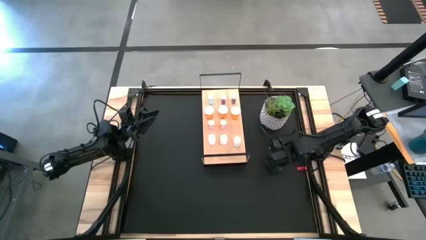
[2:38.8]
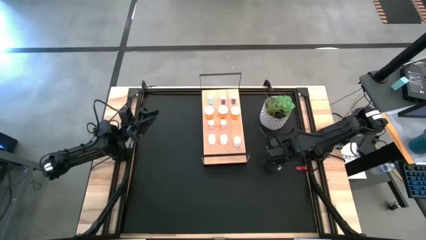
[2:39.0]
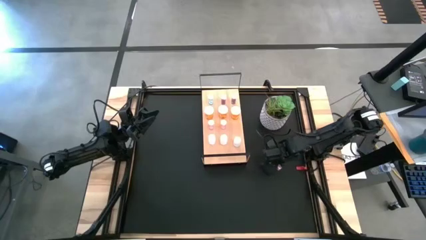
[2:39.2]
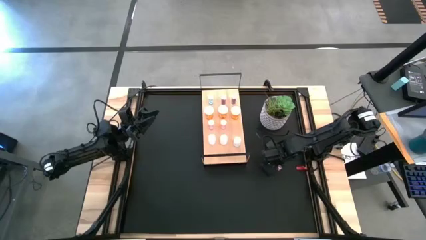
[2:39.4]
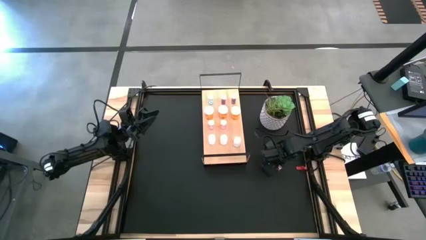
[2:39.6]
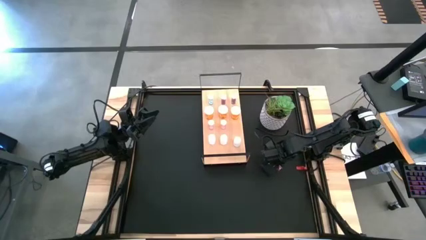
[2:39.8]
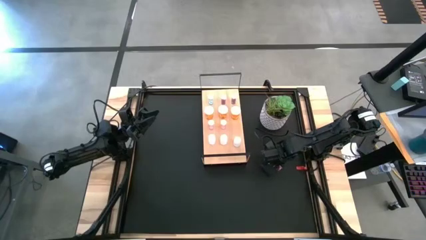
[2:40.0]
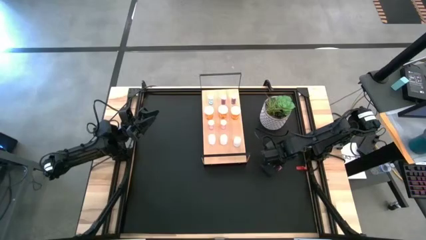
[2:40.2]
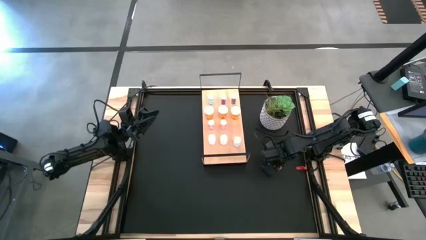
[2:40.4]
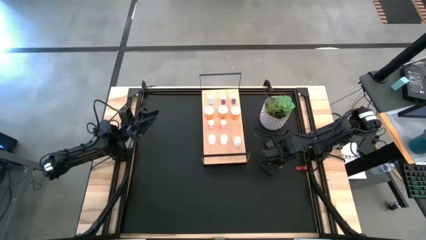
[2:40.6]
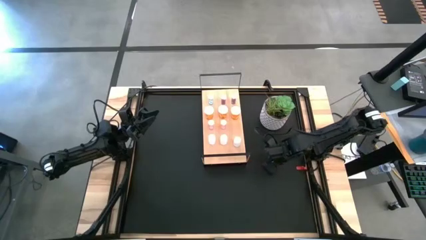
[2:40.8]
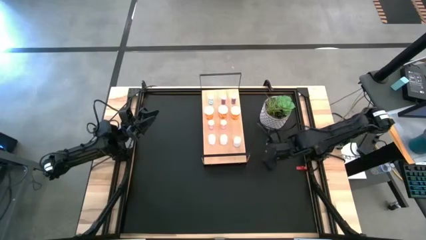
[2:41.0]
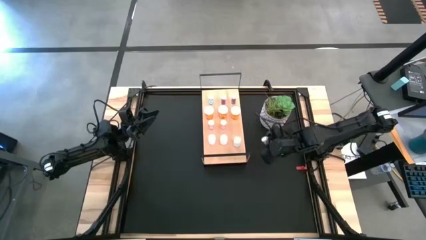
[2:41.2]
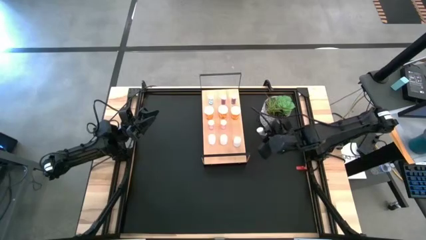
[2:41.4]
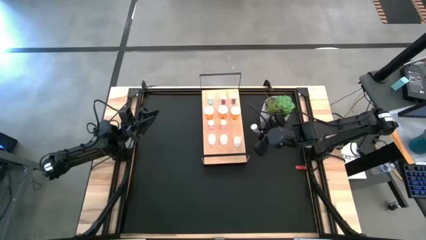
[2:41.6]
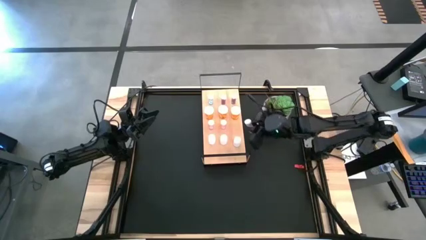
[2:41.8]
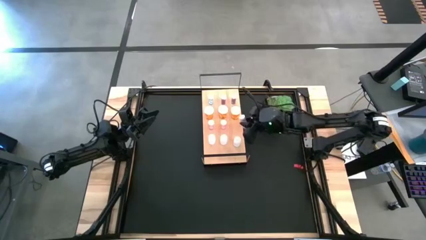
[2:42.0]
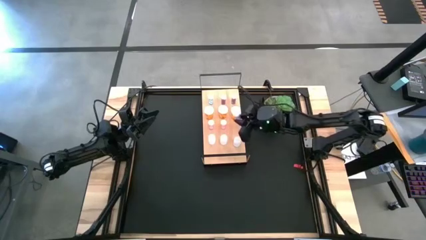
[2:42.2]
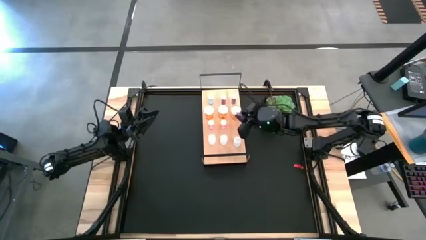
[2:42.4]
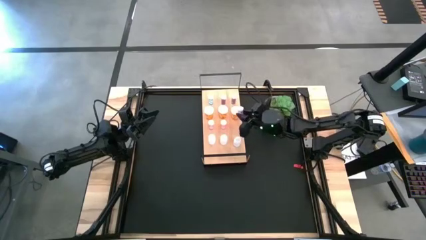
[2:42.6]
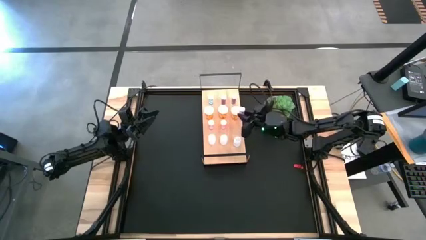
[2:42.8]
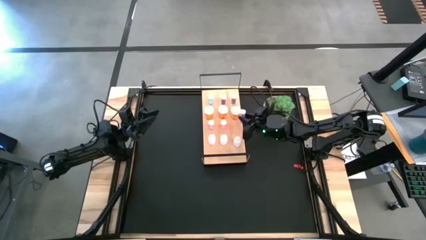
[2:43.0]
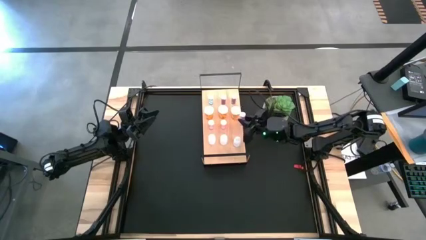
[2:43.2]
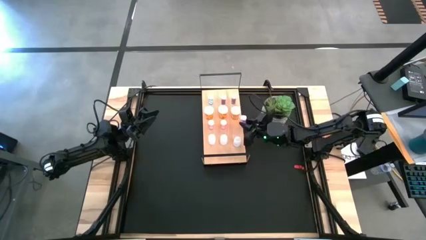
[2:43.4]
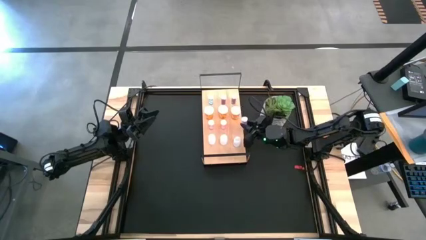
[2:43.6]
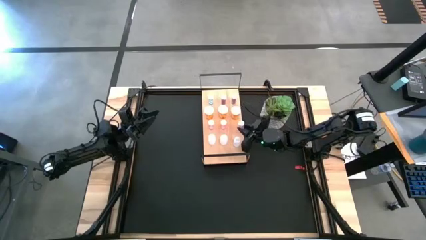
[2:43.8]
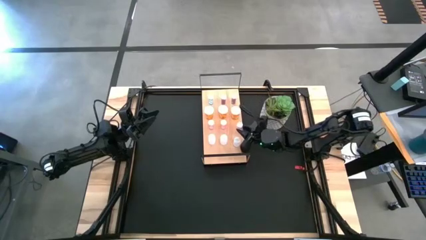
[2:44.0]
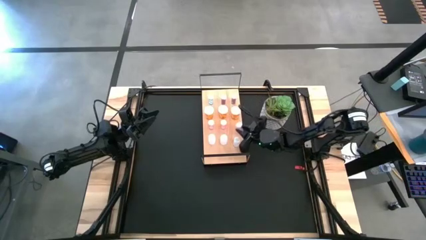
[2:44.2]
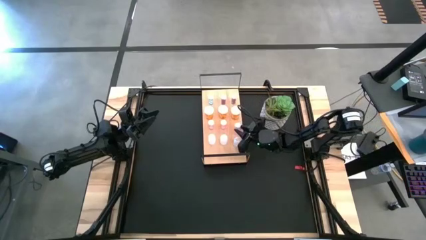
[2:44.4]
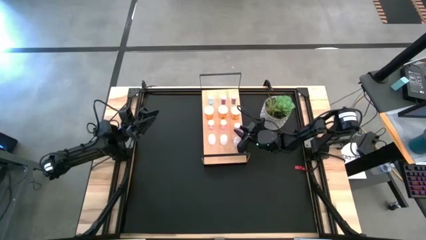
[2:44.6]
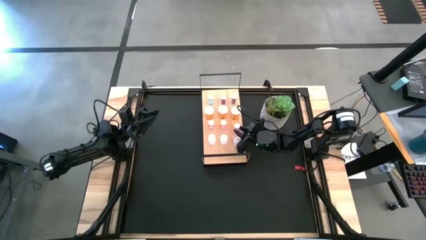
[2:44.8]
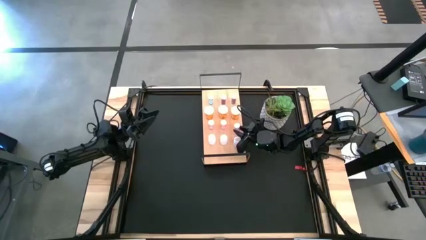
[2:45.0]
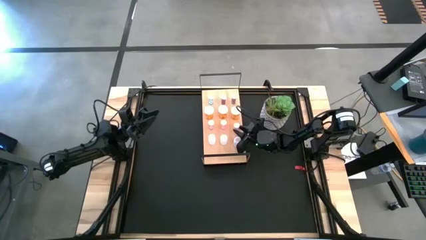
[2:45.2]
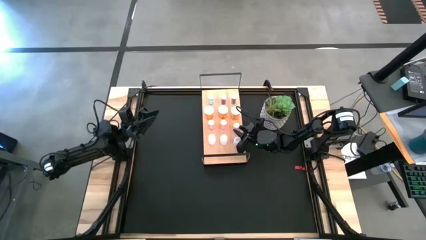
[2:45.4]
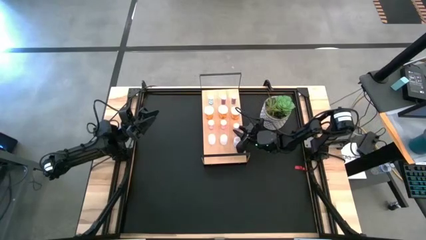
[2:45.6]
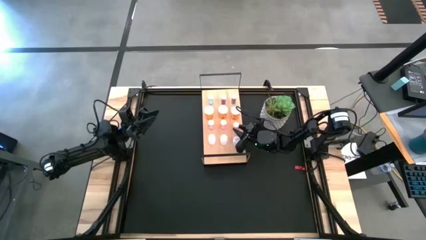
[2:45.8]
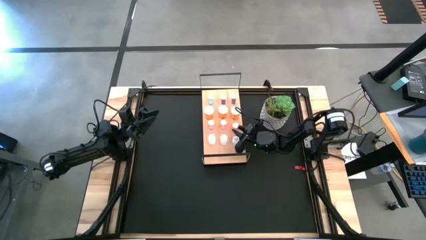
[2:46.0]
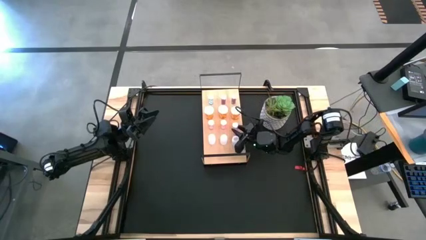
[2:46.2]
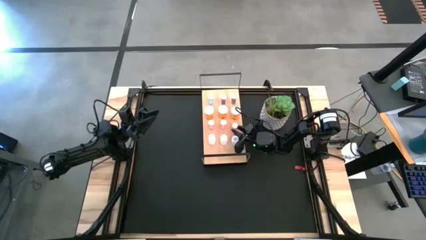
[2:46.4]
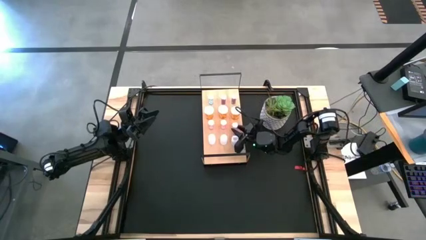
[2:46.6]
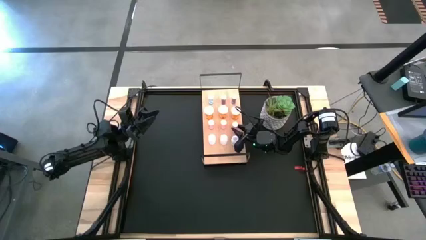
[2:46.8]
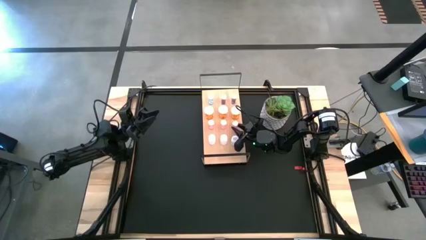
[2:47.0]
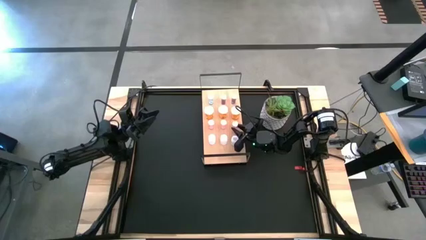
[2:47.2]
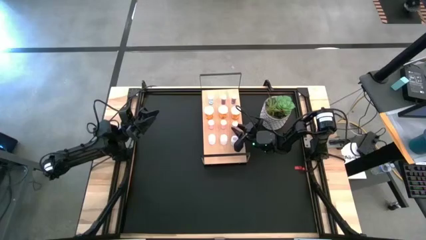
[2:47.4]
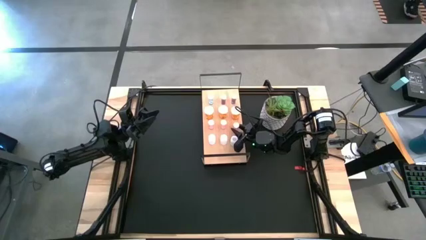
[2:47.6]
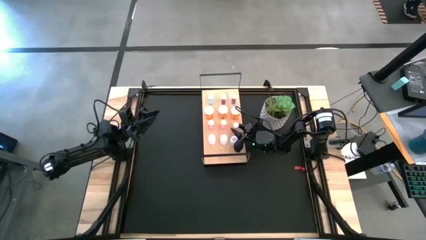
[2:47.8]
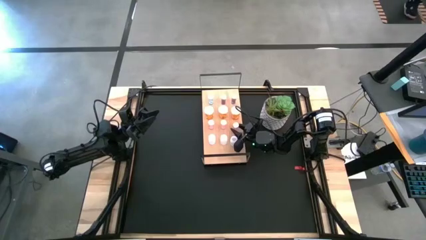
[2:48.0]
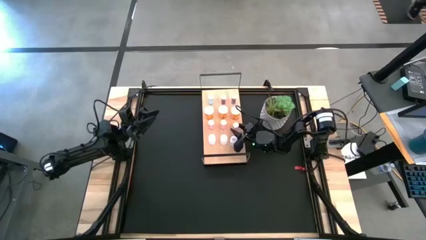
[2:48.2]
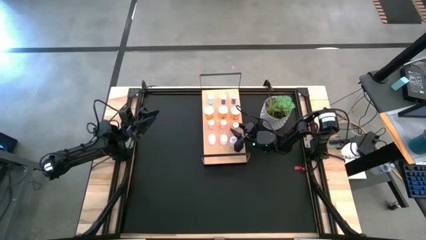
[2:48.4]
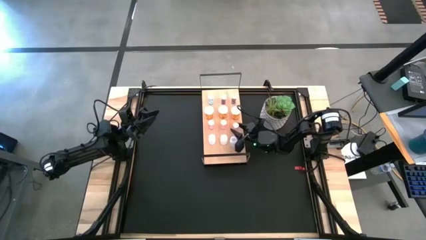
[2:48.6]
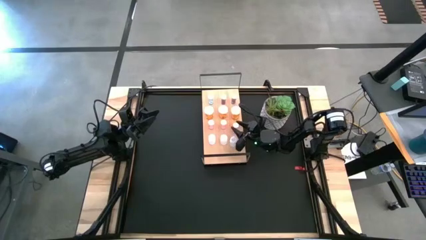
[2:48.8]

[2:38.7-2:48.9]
Task: Pick and place medicine bottles onto shelf by color
Put the pink pill bottle on the shelf aligned with the pink pill bottle

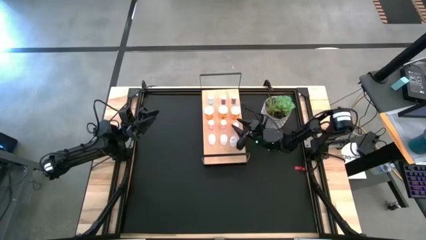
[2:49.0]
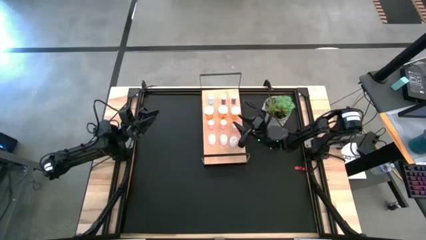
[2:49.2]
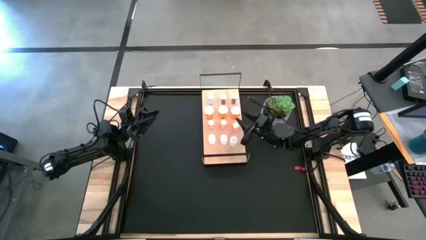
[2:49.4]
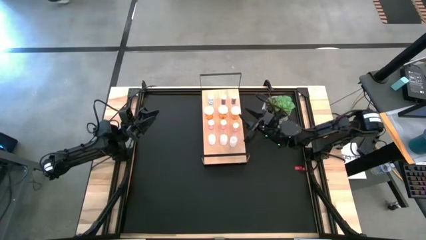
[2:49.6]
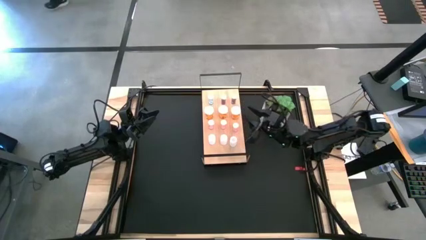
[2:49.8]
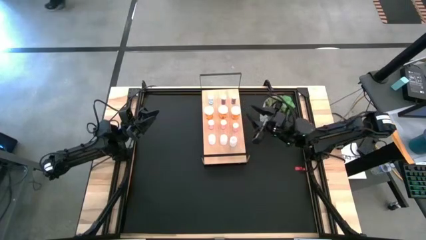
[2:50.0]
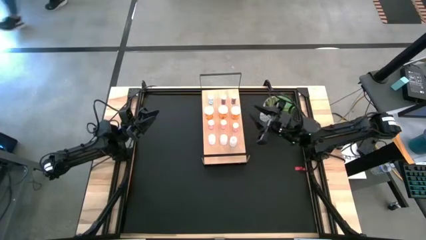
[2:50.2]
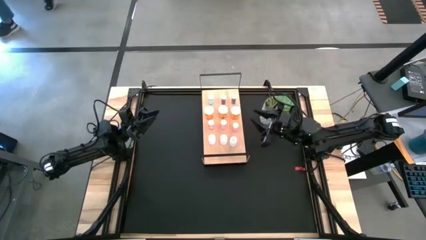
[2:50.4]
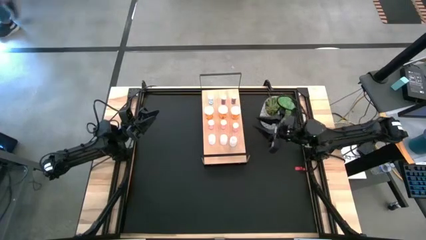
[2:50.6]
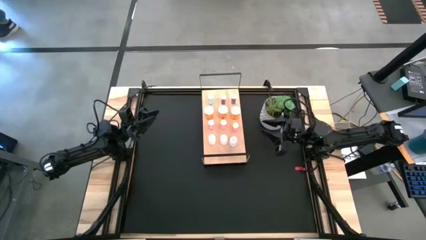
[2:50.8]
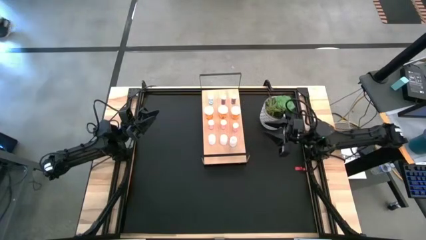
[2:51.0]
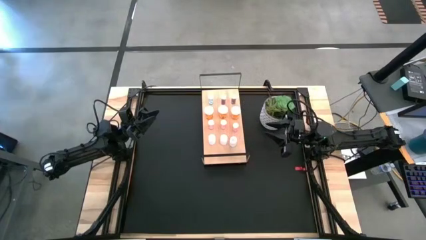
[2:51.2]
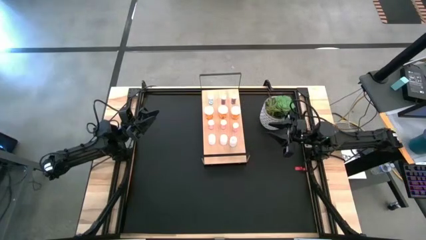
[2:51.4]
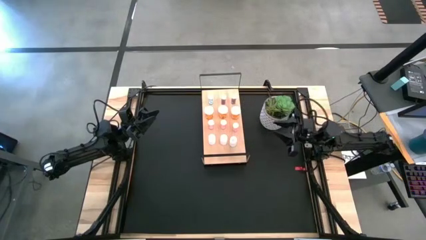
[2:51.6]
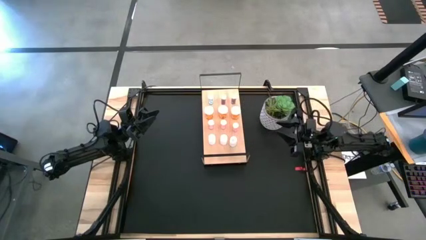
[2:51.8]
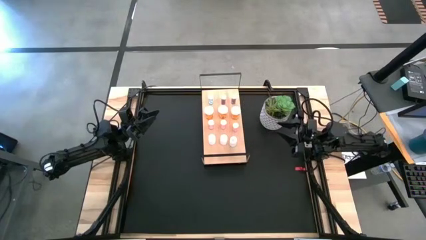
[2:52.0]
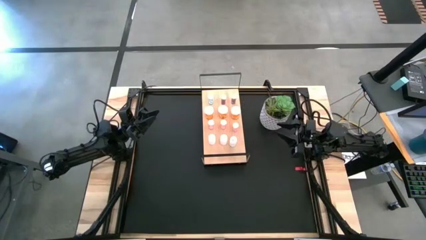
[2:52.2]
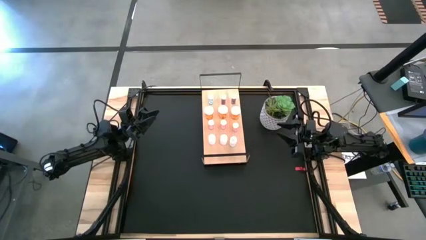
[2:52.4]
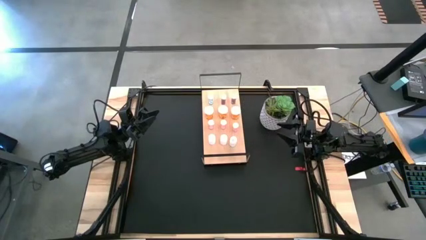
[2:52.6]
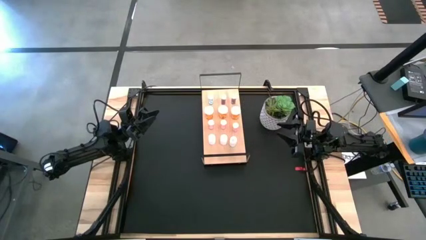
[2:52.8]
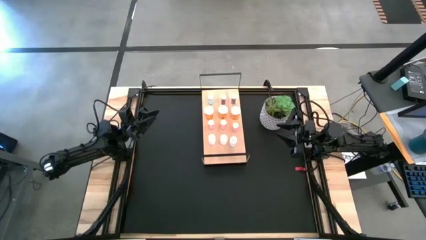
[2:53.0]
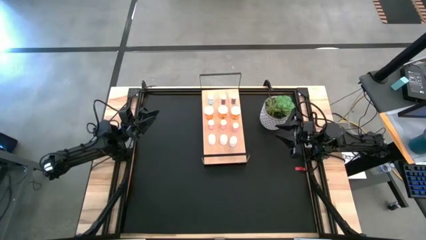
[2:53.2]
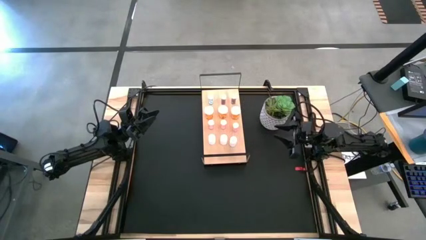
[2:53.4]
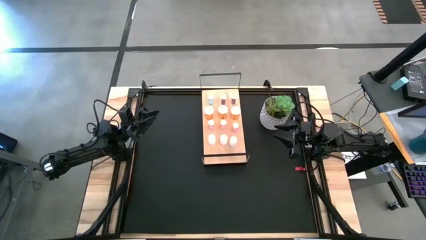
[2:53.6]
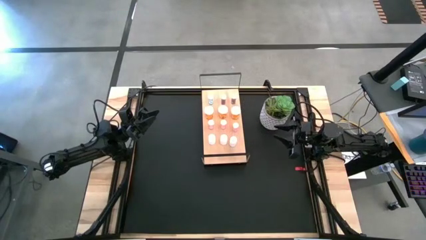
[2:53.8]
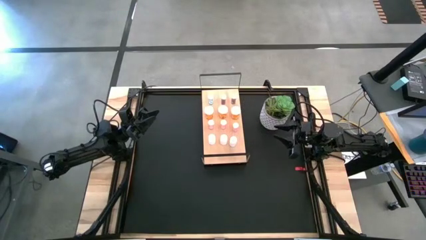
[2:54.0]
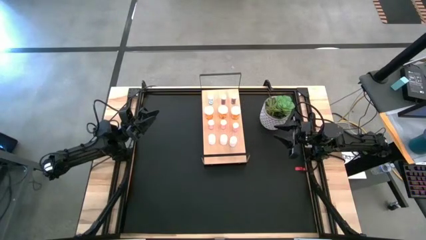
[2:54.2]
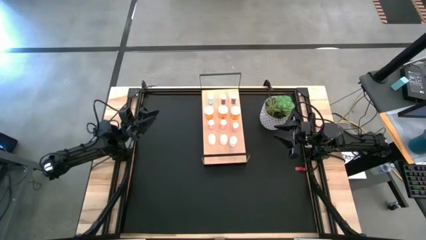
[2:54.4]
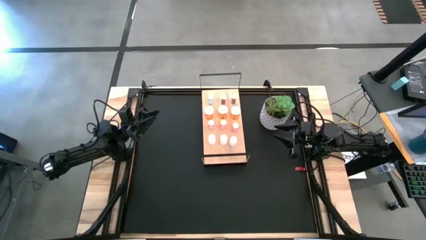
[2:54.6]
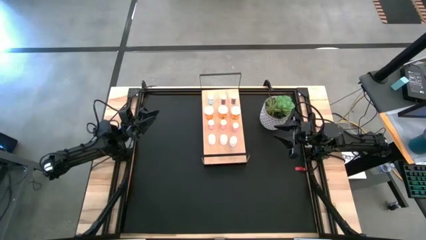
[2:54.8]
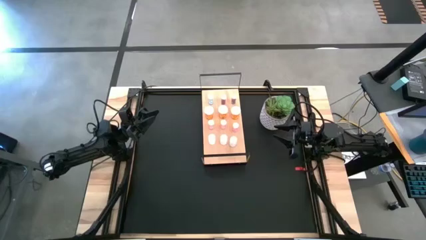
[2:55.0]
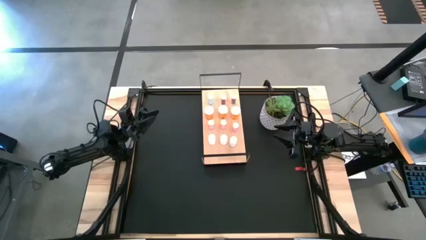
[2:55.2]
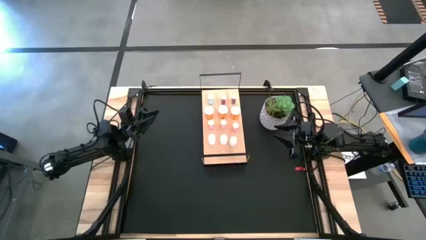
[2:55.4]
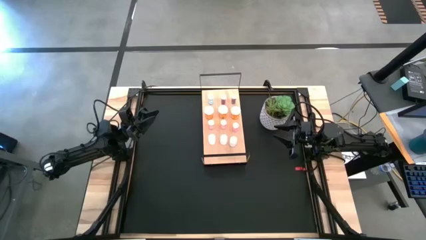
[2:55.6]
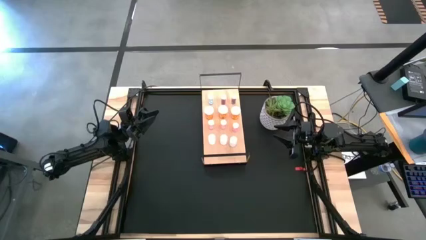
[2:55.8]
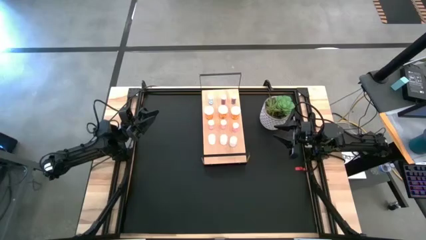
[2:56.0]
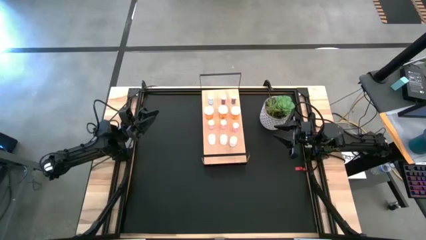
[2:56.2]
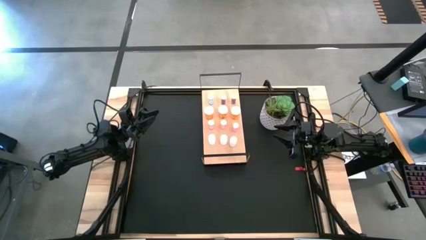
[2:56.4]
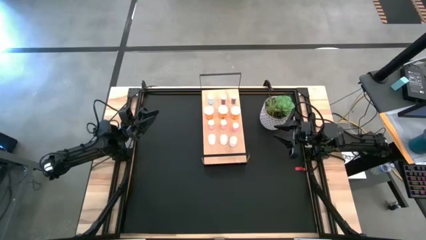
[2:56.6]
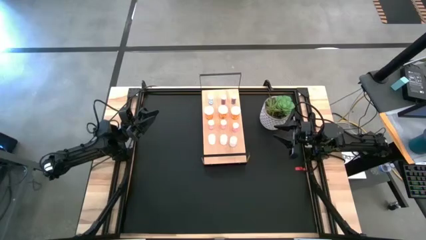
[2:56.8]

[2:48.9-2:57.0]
Return to Home Position
